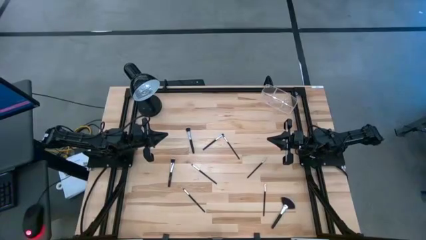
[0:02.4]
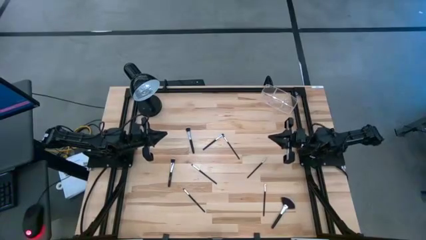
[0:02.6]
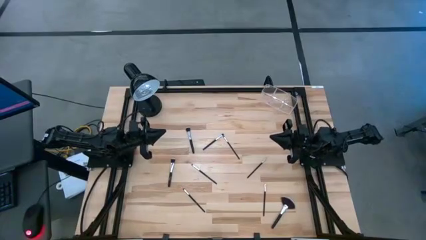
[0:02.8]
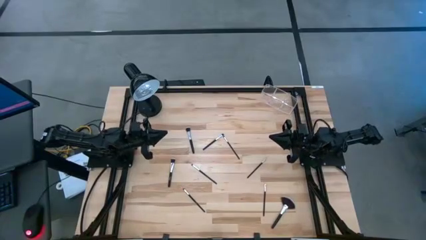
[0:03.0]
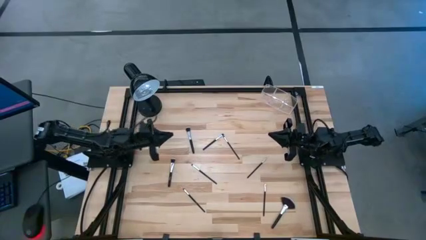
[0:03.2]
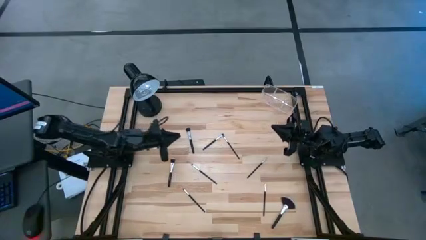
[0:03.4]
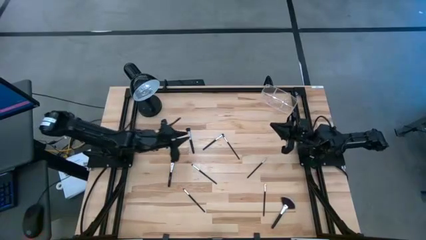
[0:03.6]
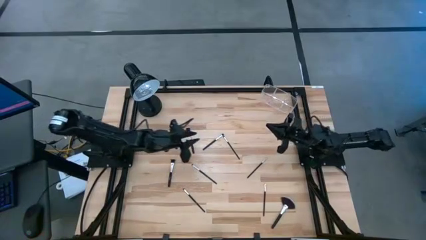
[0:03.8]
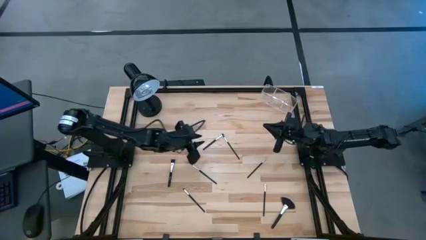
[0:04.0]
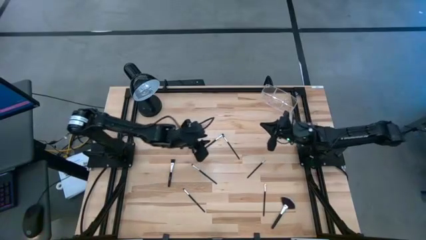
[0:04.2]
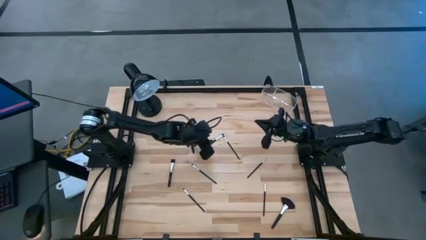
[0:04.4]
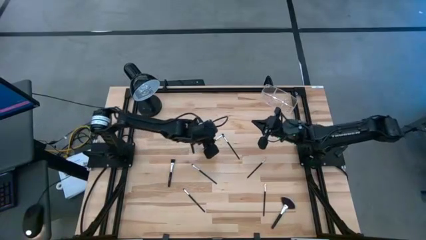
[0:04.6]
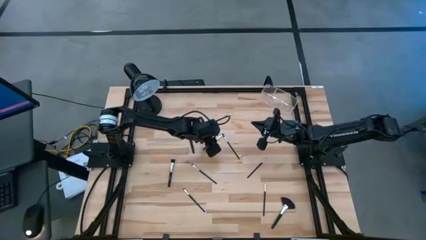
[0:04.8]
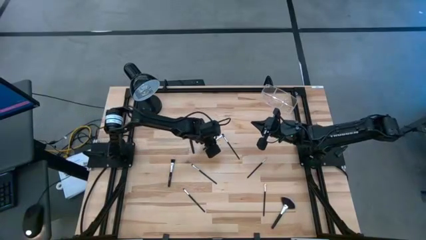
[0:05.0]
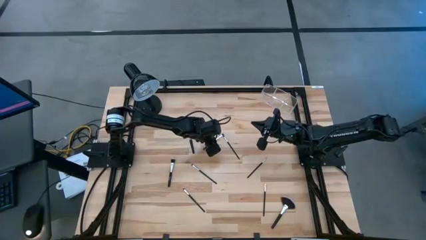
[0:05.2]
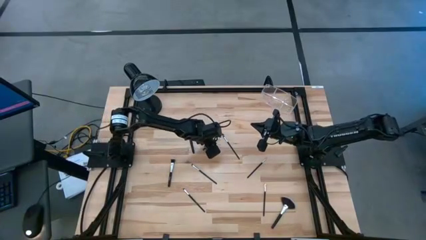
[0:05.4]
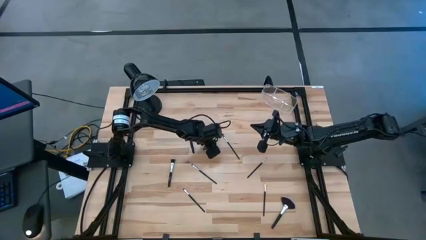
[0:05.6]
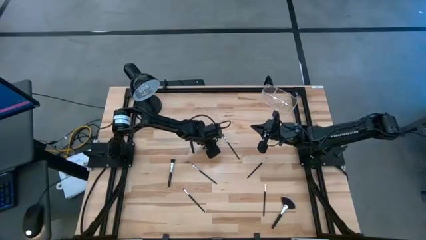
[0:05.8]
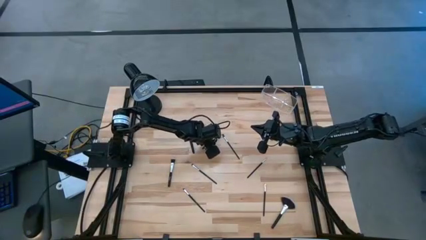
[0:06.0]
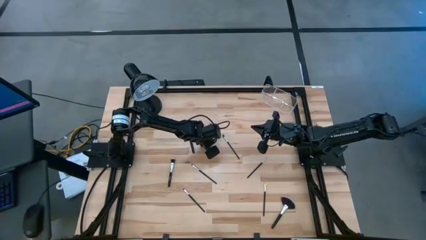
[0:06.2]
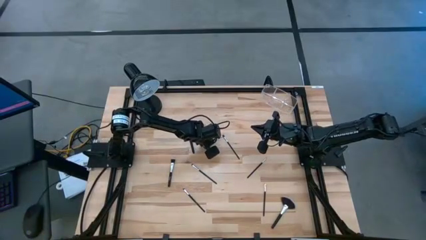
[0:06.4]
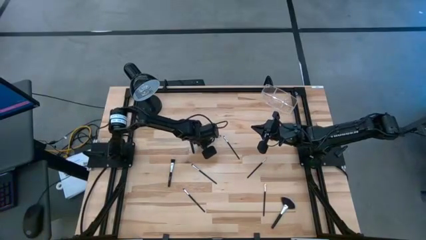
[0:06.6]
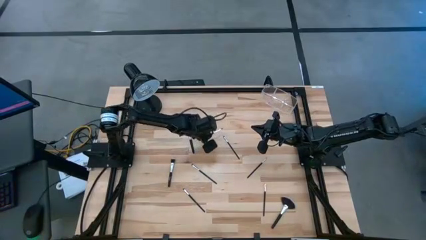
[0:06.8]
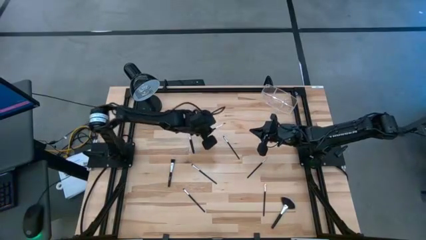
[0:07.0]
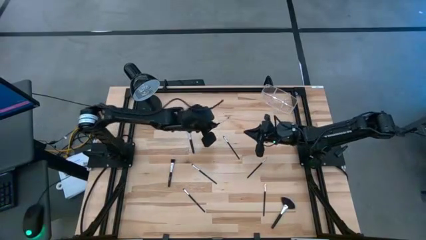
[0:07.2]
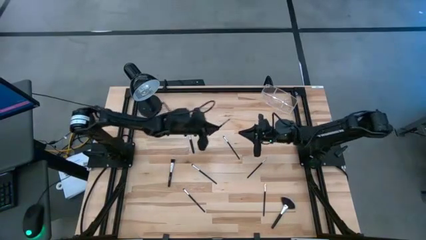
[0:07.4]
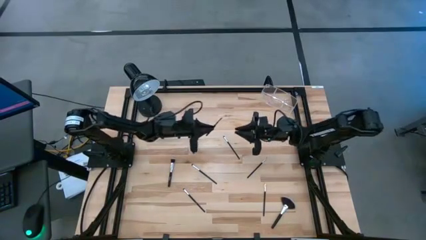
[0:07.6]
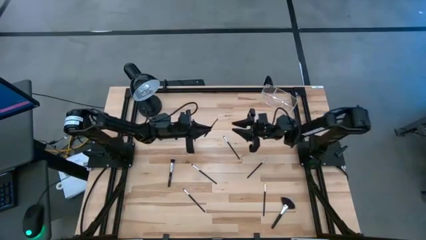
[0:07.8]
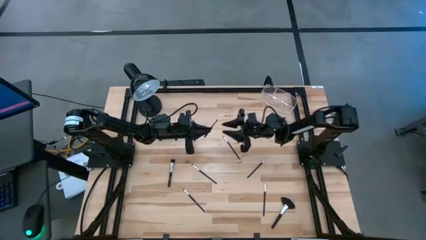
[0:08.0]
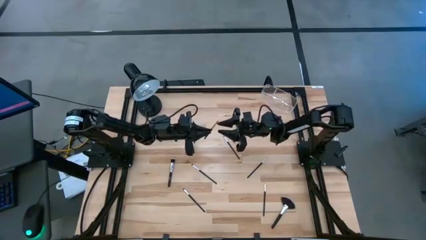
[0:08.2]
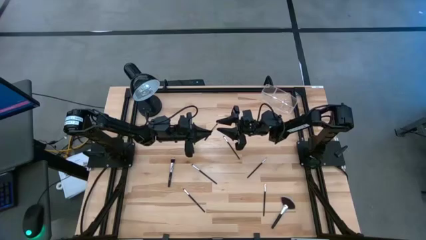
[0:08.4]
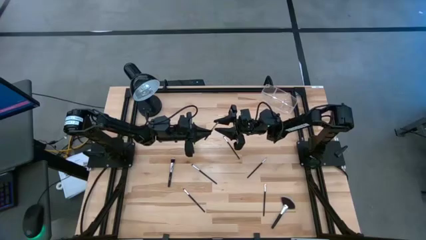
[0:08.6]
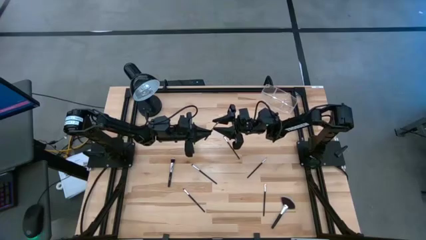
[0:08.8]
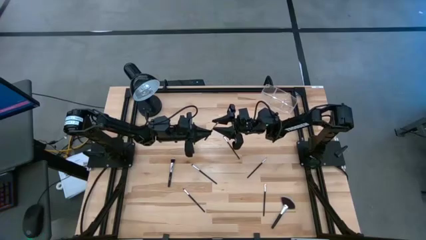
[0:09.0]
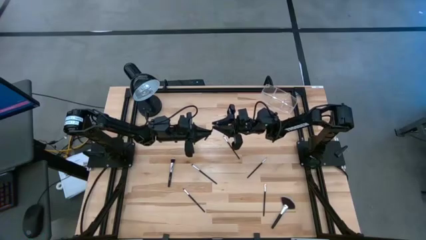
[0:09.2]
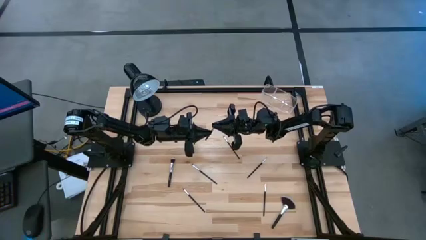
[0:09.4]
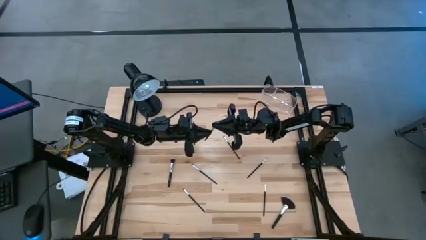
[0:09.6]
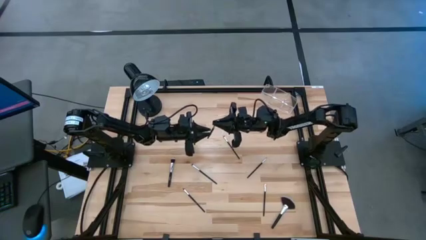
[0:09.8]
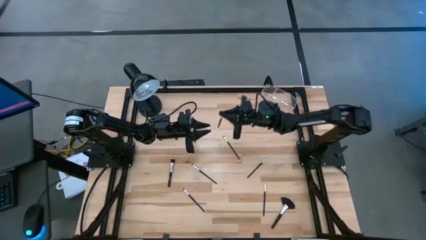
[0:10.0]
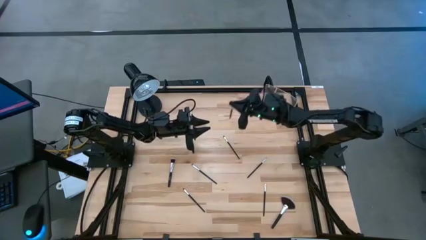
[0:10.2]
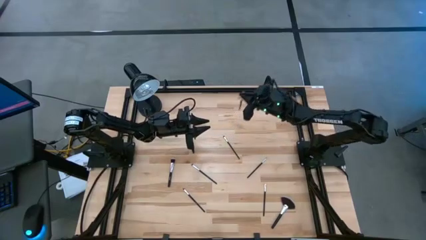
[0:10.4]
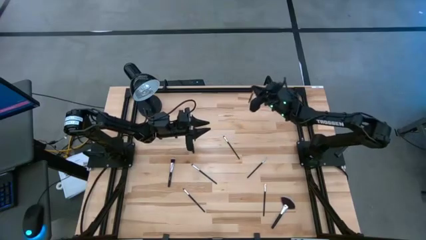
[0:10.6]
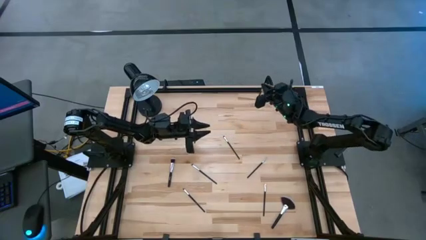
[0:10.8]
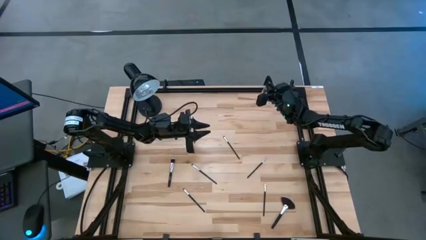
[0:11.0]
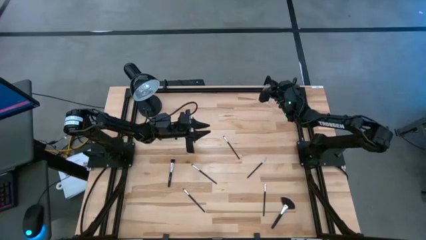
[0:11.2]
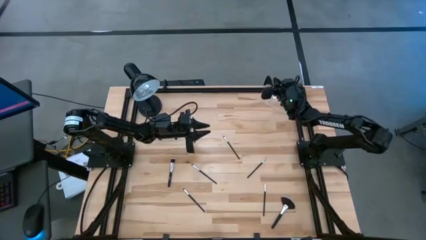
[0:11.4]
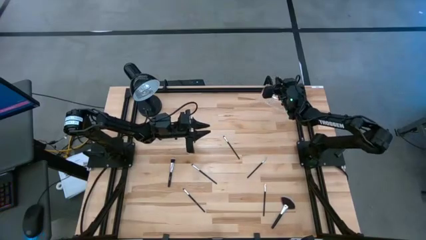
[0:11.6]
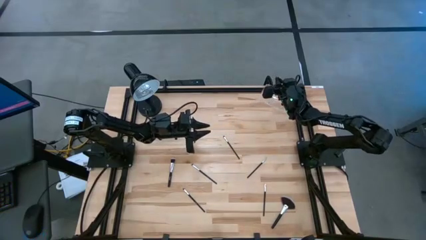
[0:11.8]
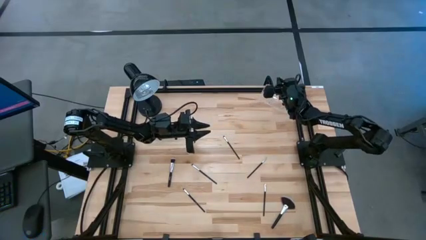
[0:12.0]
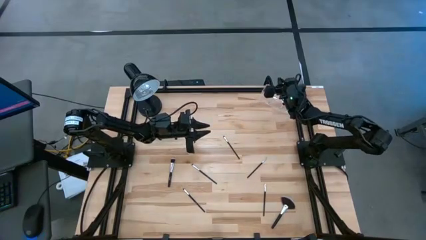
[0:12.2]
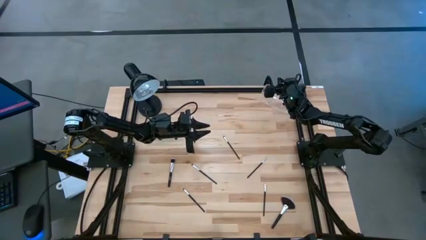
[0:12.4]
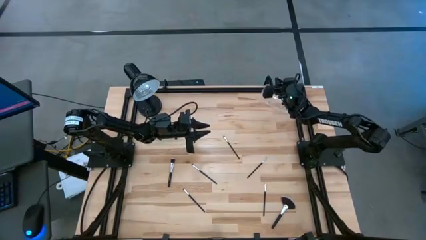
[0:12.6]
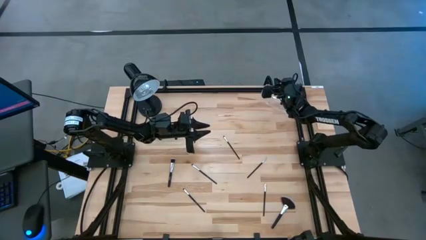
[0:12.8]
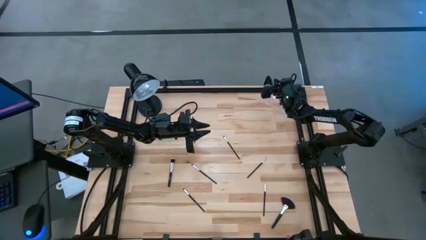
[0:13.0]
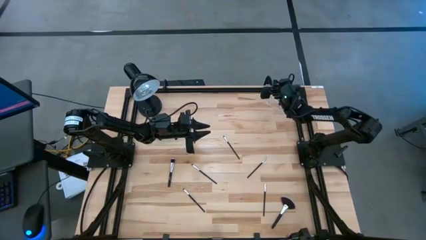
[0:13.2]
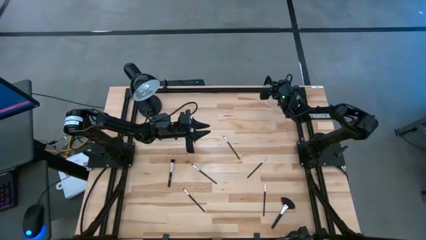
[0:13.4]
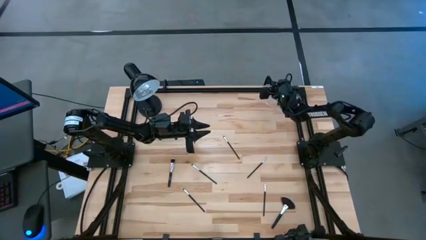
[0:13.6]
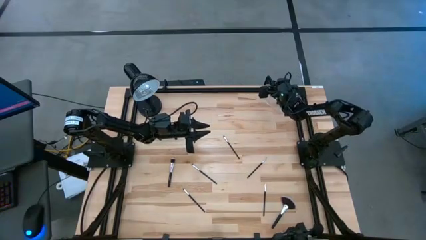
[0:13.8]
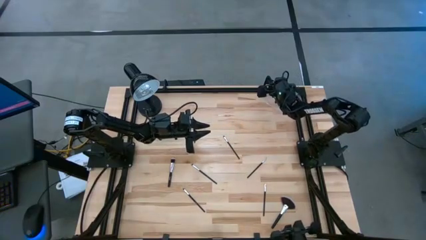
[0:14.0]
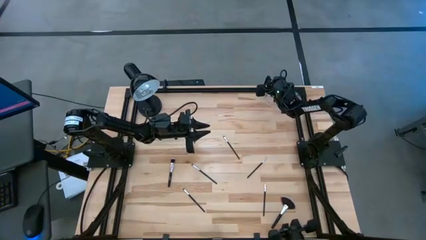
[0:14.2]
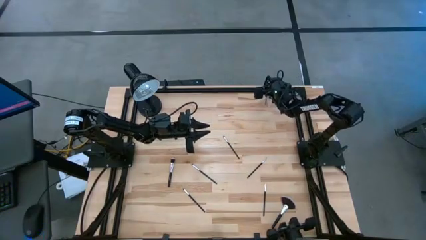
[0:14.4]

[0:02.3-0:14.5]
Task: Sort items
Put the foundation brush into the transparent organizer
